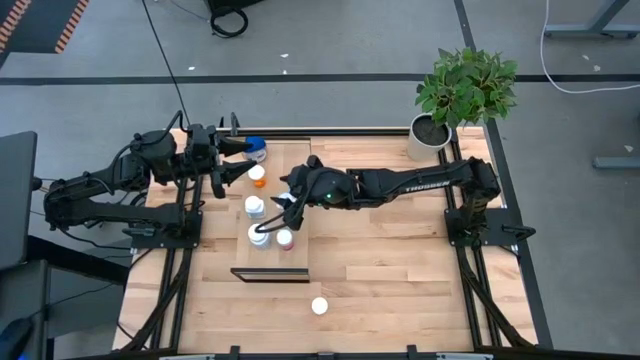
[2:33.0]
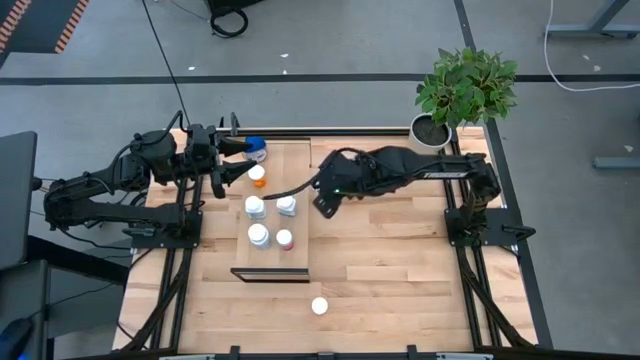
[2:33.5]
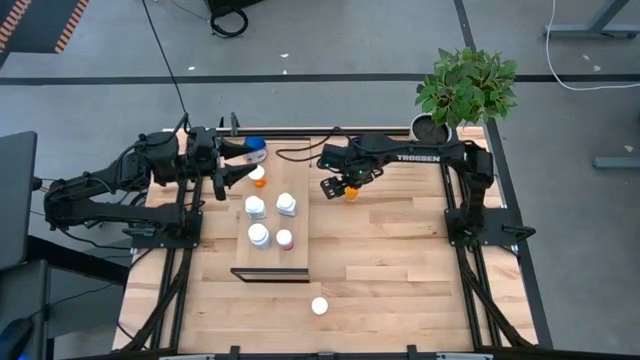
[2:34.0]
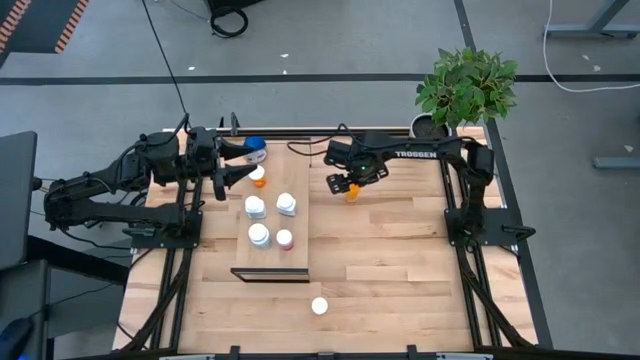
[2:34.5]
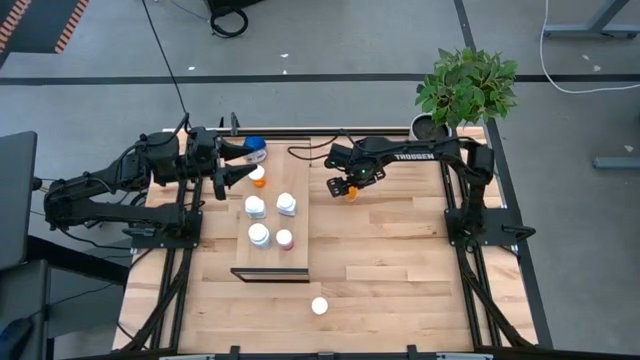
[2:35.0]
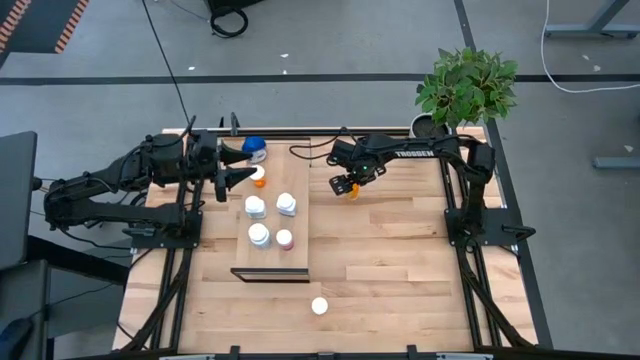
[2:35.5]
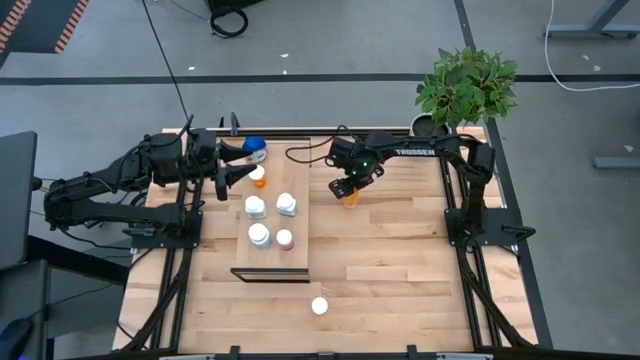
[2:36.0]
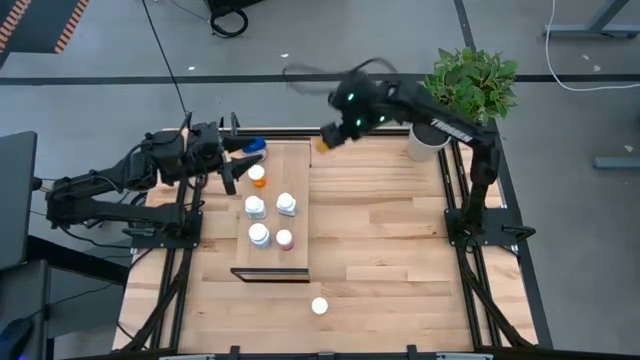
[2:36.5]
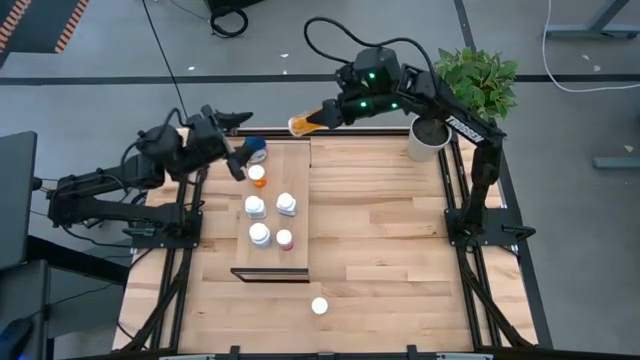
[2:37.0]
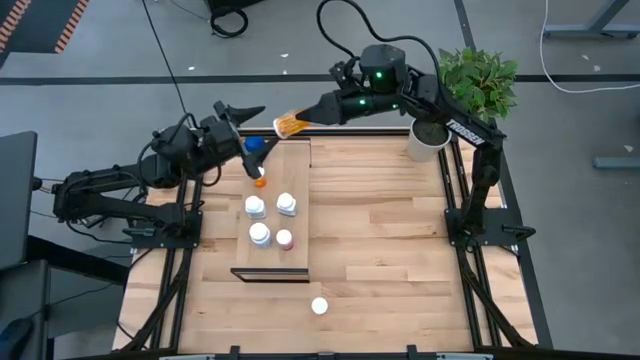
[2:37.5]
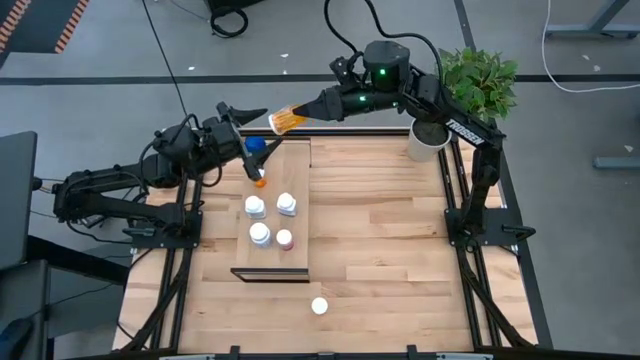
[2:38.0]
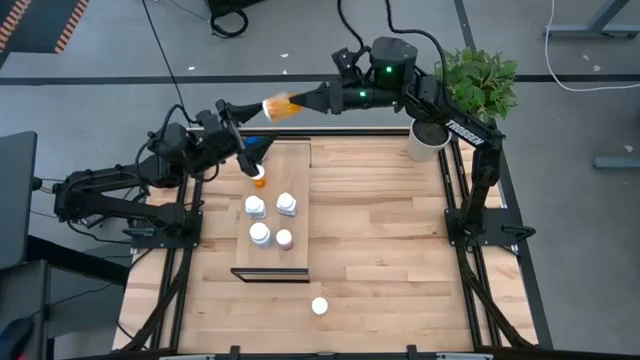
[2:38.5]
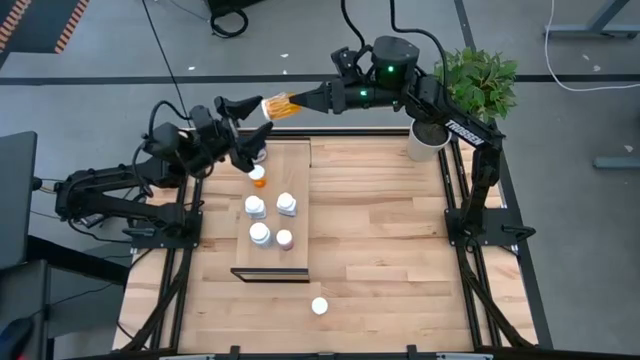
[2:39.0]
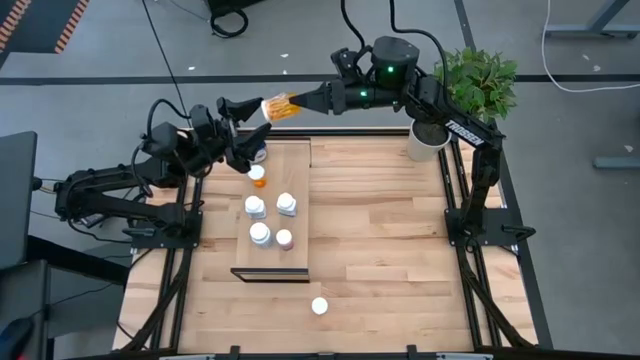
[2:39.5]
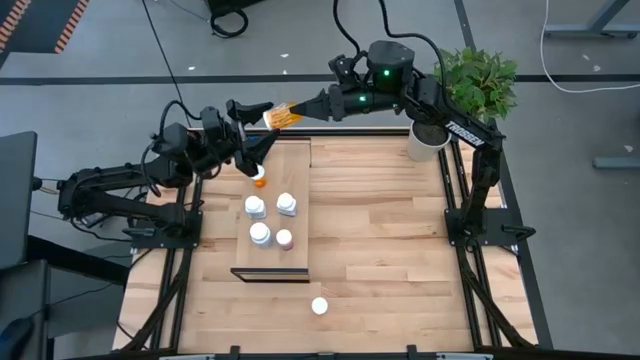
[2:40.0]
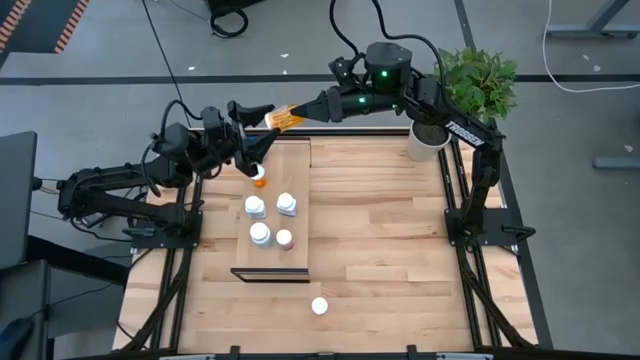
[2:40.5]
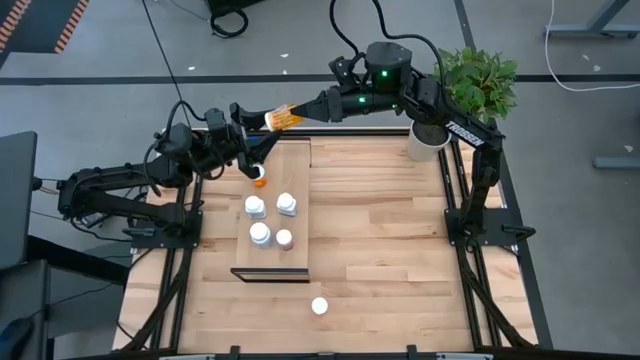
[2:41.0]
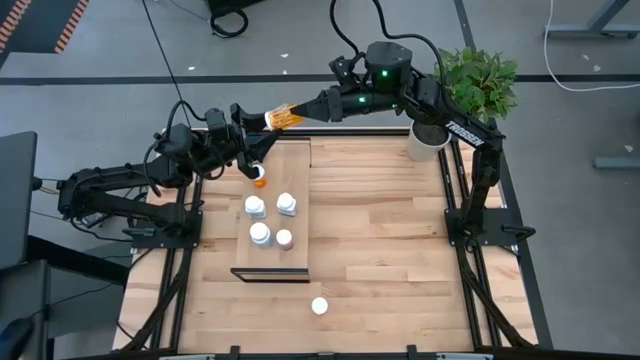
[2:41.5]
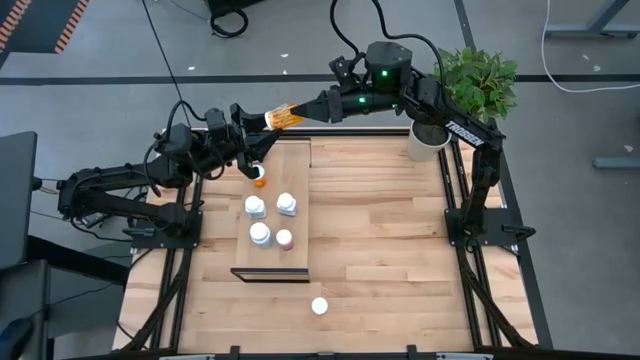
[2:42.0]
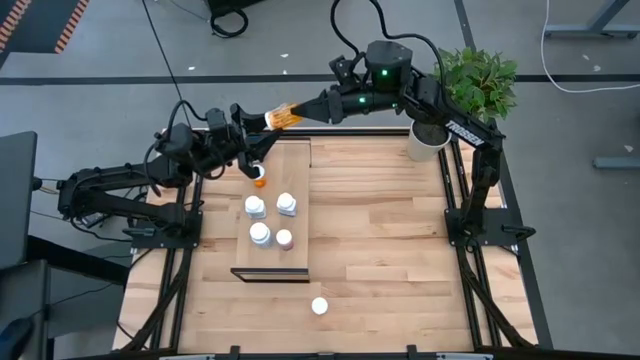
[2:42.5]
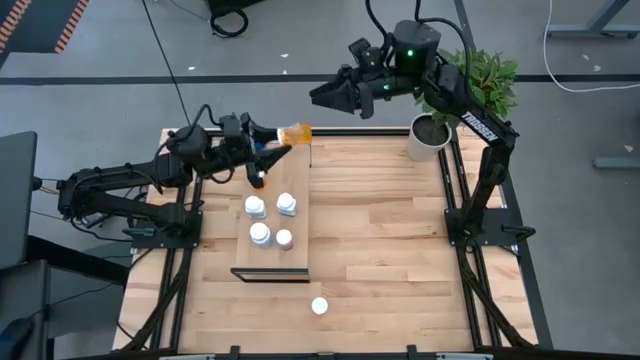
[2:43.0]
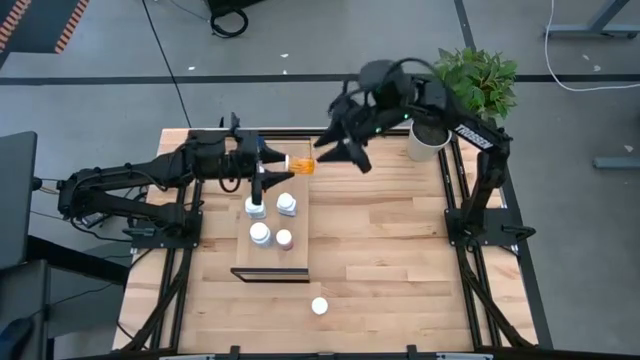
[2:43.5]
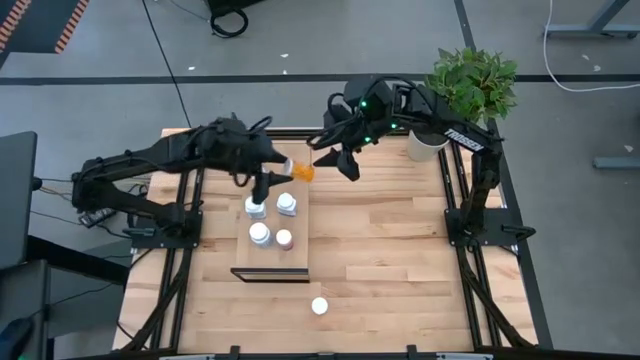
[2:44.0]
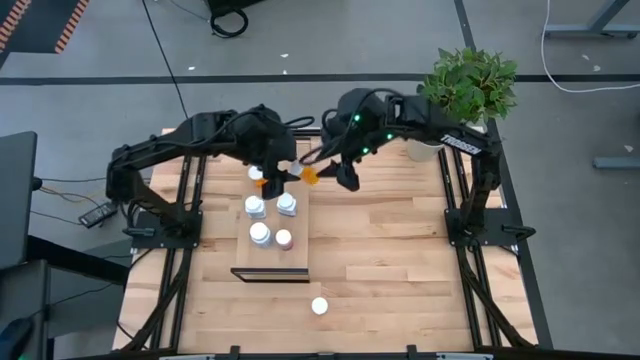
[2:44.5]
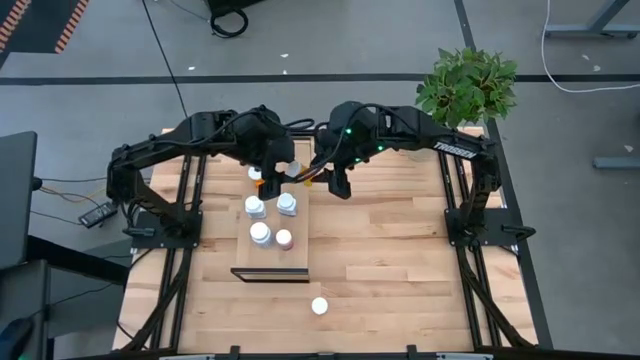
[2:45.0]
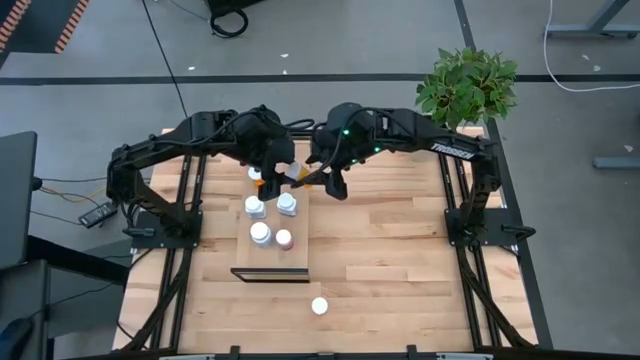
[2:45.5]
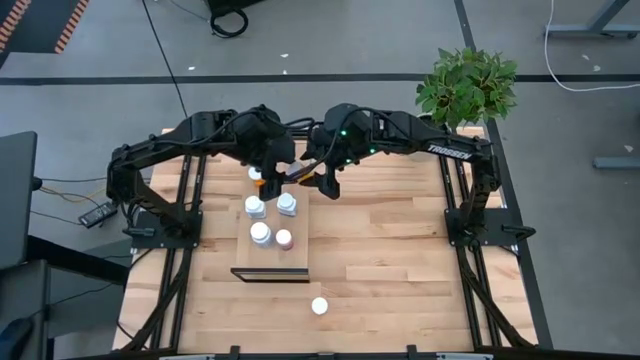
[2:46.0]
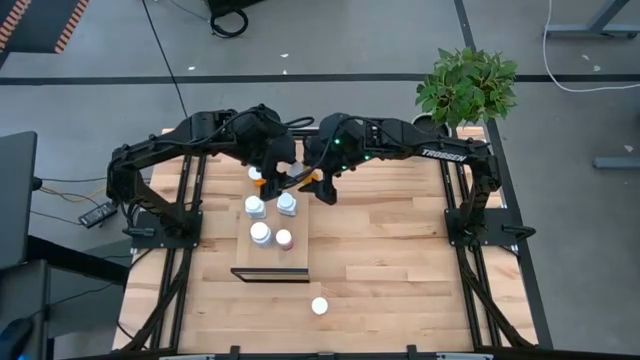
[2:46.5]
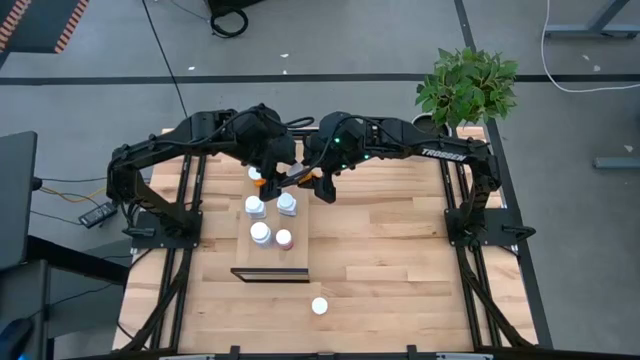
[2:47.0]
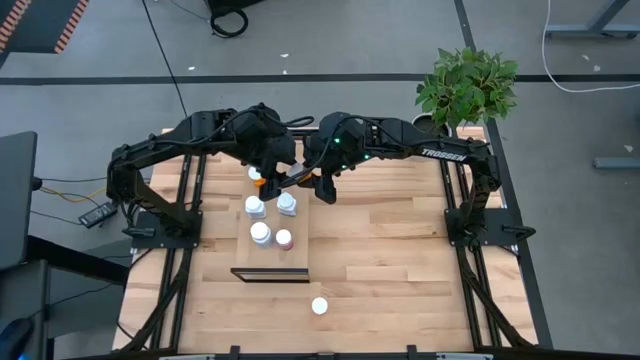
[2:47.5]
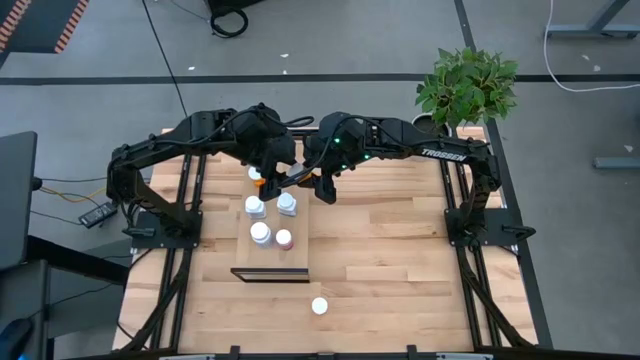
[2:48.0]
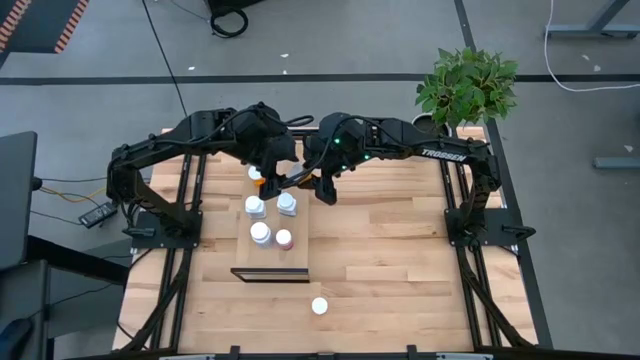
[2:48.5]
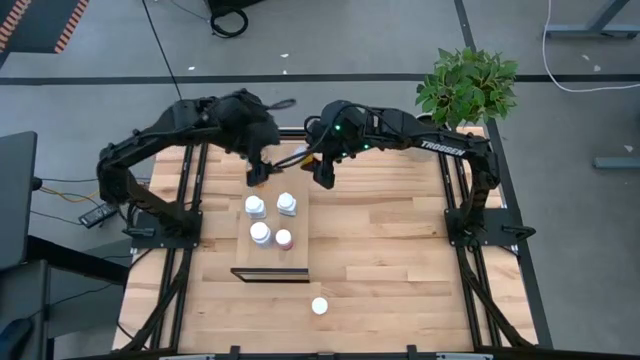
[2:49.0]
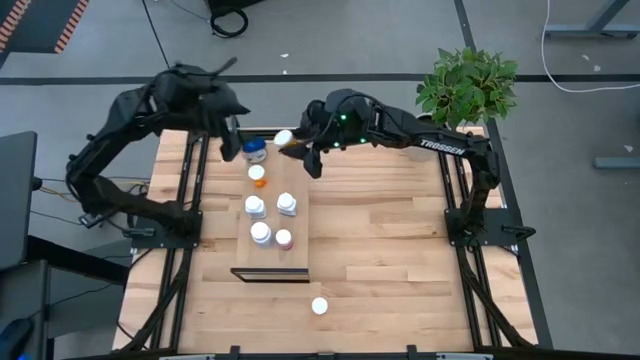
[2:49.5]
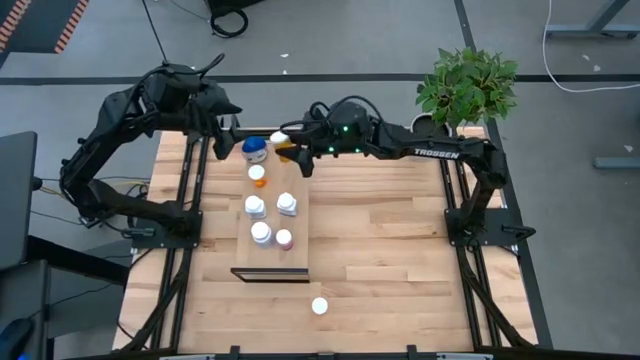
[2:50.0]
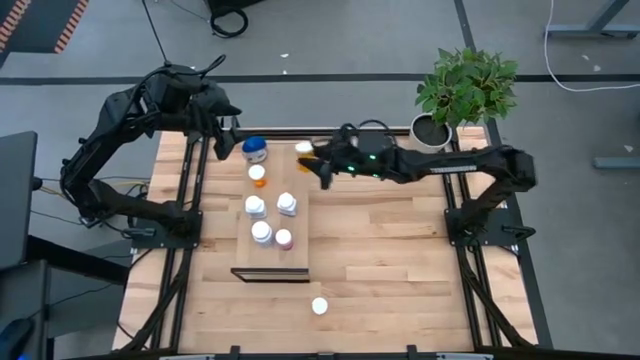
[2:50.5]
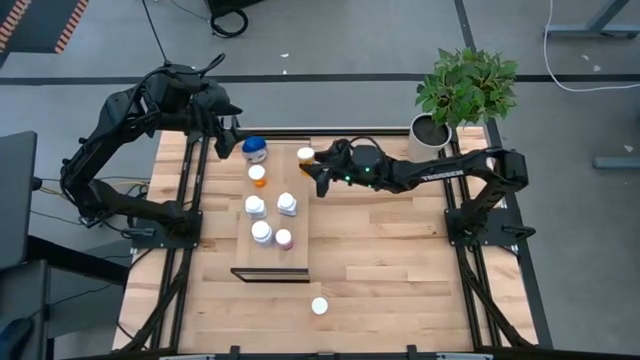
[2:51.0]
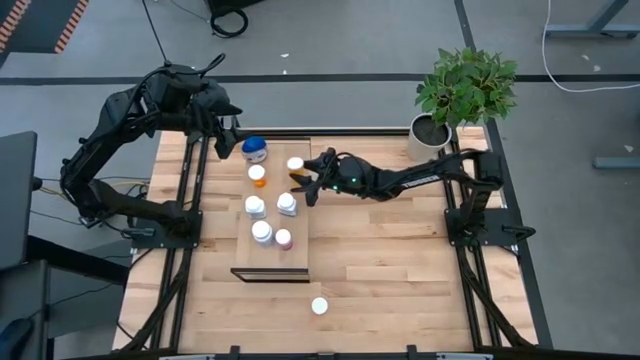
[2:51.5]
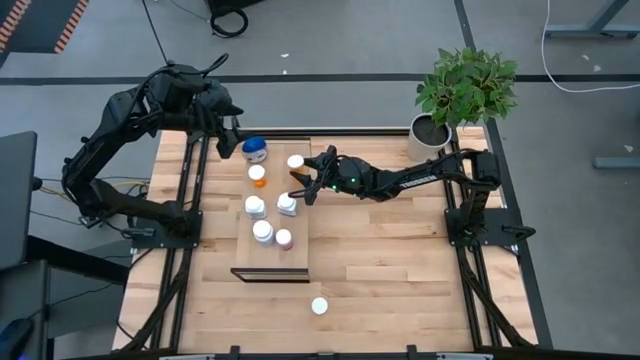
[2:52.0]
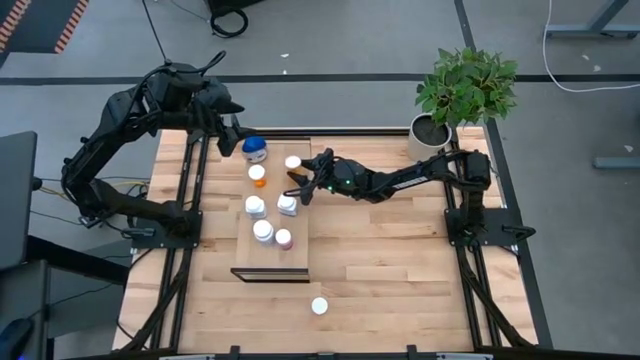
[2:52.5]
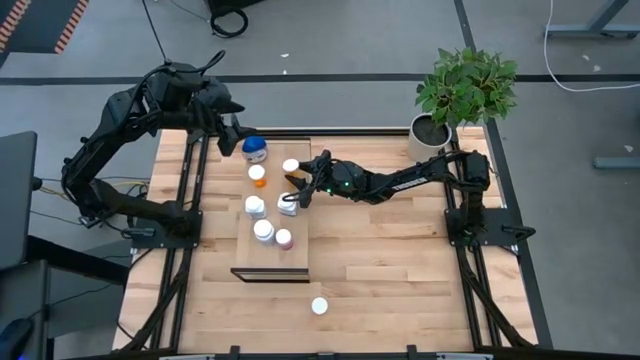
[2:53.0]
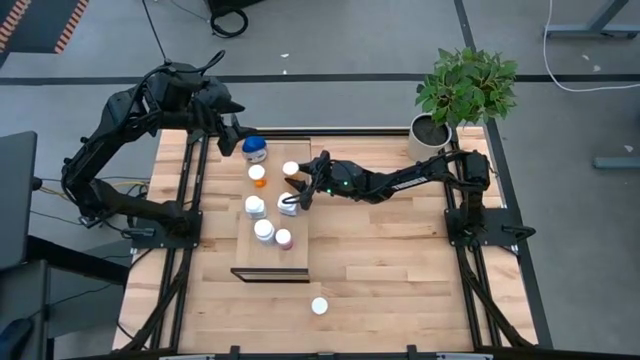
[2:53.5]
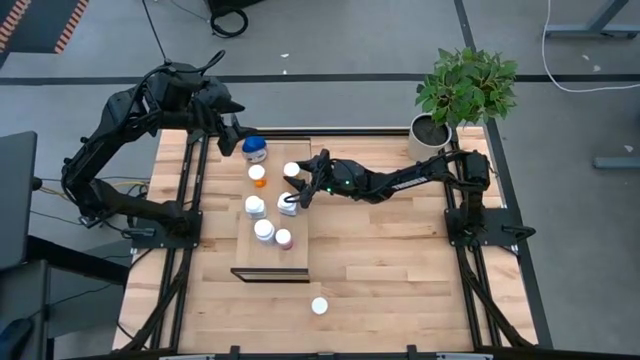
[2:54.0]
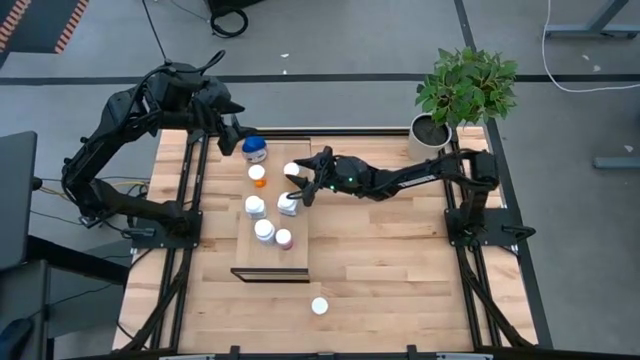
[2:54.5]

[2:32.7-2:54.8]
Task: Pick and place medicine bottles onto shelf by color
Put the top orange pill bottle on the shelf aligned with the other orange pill bottle
